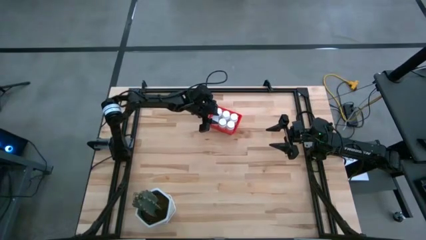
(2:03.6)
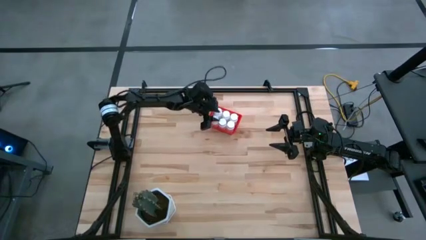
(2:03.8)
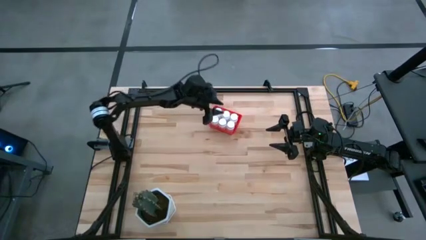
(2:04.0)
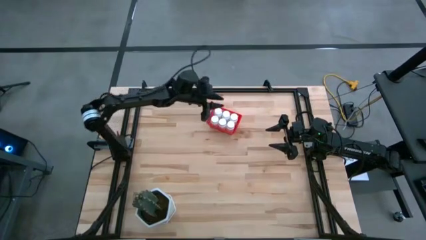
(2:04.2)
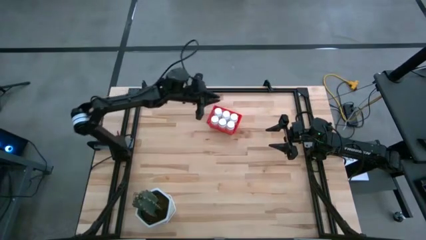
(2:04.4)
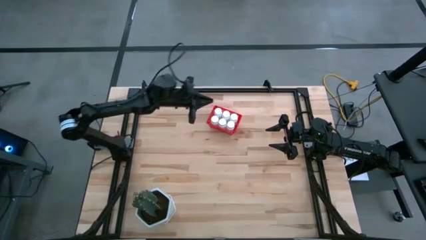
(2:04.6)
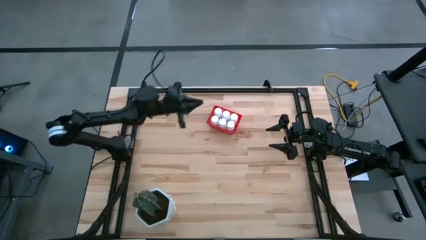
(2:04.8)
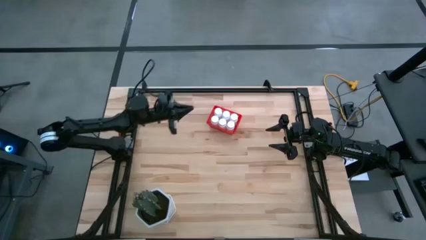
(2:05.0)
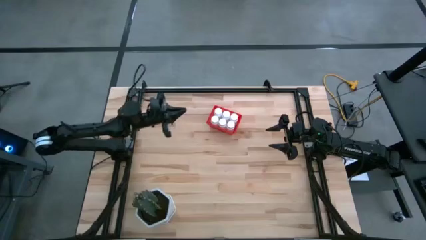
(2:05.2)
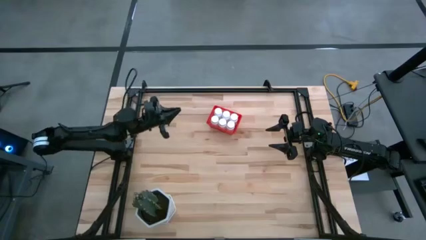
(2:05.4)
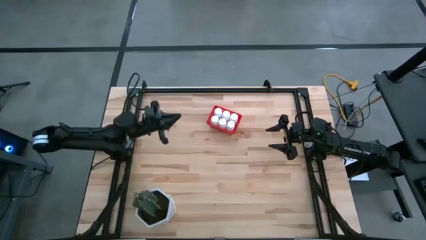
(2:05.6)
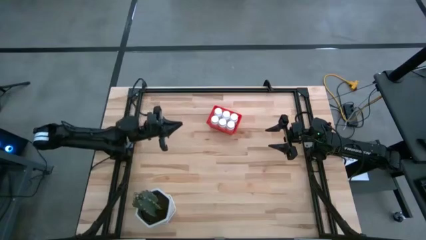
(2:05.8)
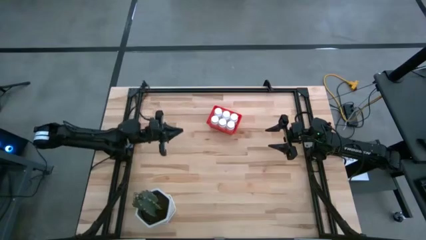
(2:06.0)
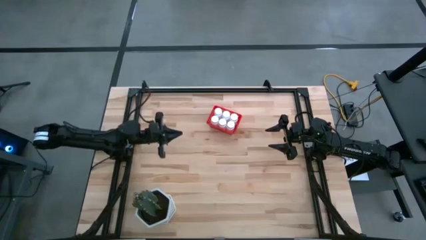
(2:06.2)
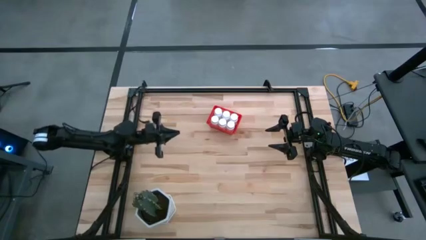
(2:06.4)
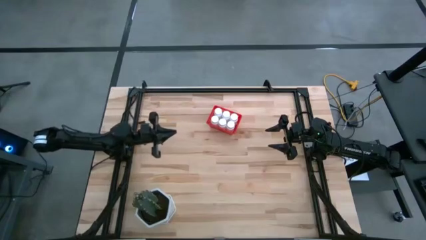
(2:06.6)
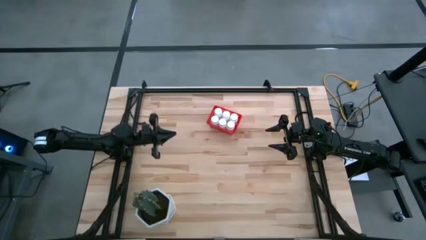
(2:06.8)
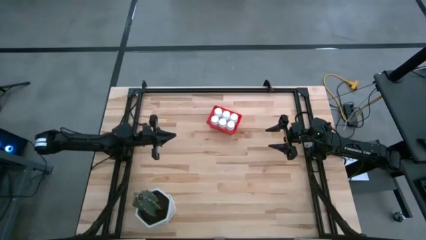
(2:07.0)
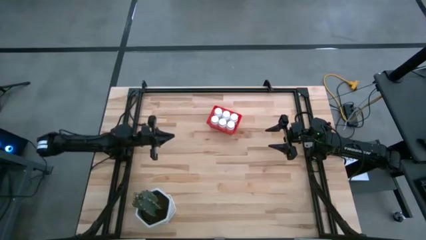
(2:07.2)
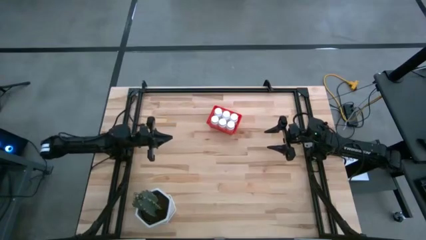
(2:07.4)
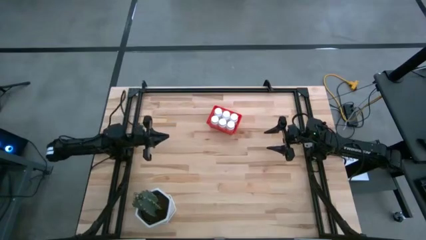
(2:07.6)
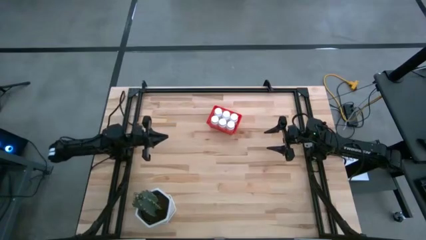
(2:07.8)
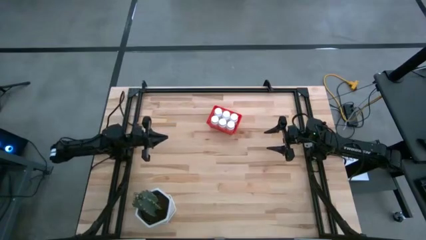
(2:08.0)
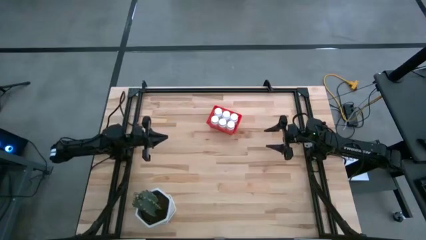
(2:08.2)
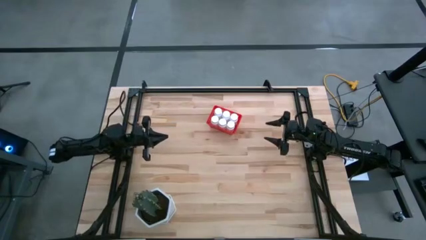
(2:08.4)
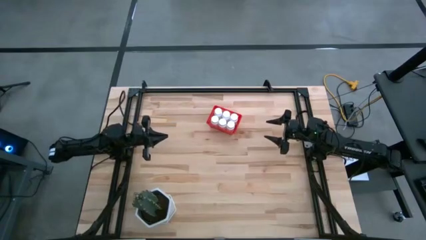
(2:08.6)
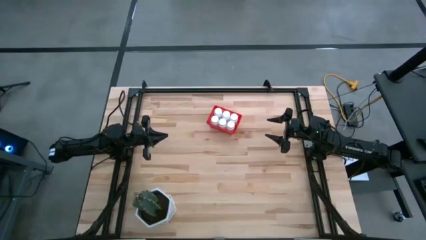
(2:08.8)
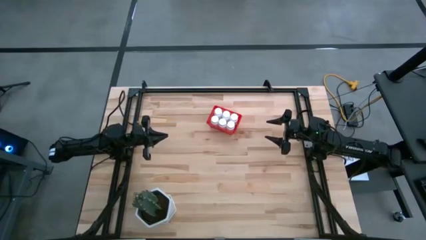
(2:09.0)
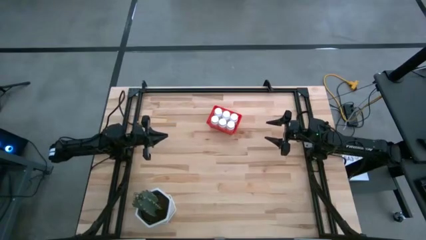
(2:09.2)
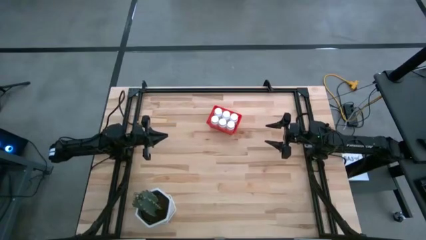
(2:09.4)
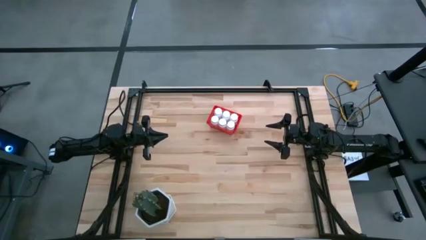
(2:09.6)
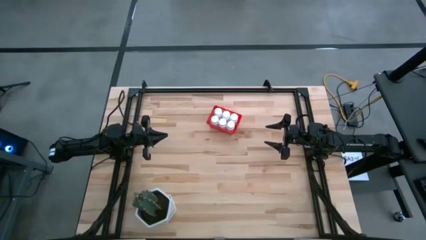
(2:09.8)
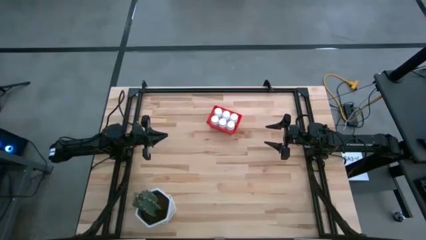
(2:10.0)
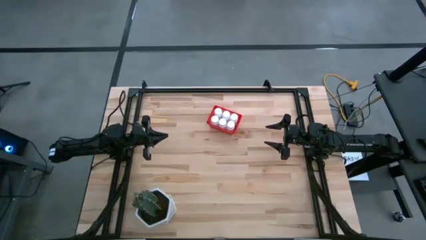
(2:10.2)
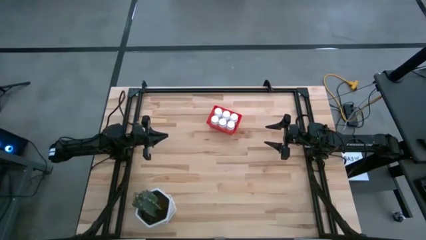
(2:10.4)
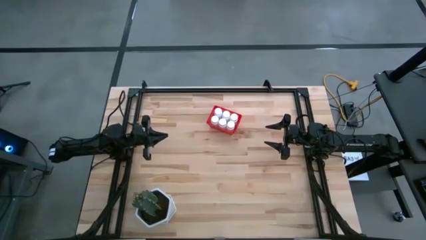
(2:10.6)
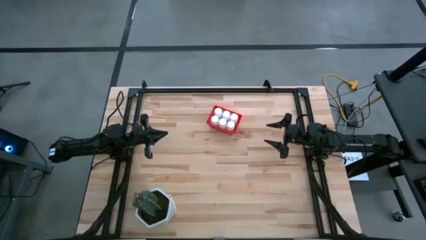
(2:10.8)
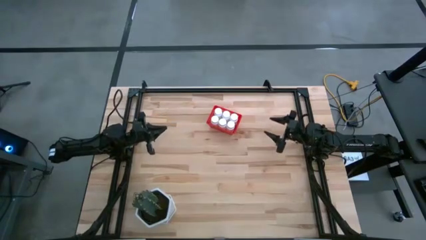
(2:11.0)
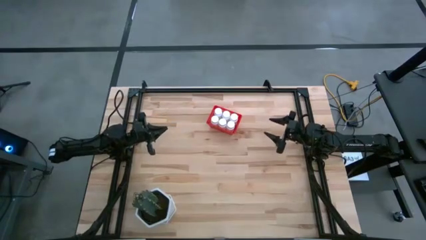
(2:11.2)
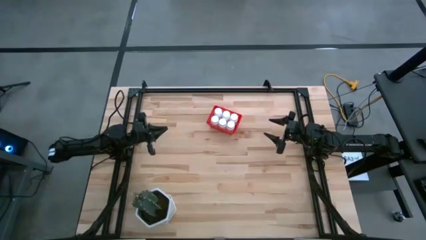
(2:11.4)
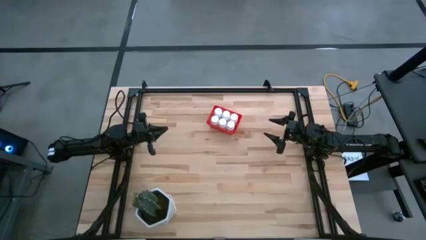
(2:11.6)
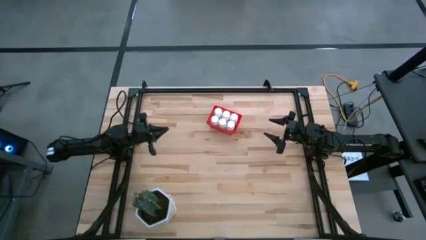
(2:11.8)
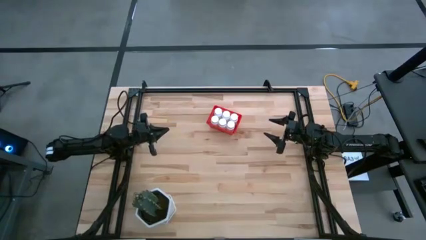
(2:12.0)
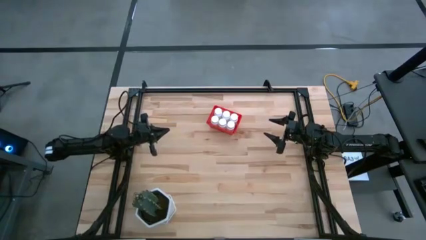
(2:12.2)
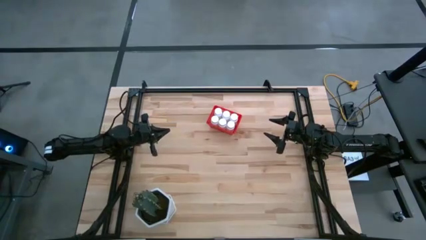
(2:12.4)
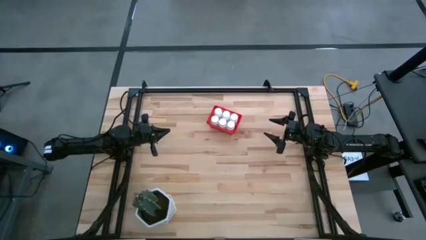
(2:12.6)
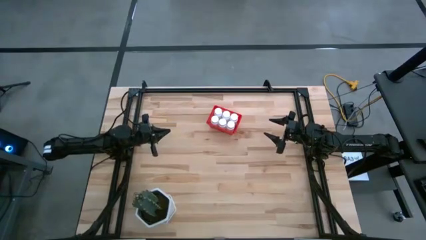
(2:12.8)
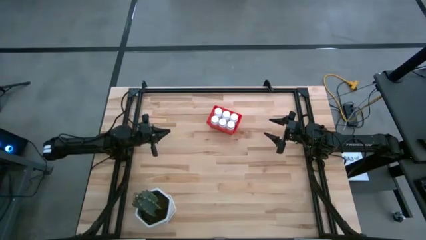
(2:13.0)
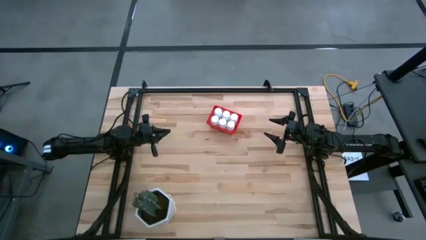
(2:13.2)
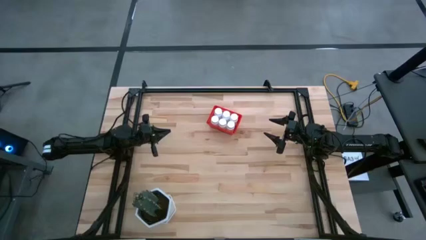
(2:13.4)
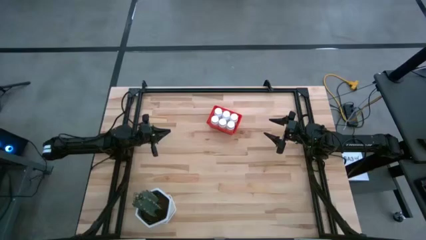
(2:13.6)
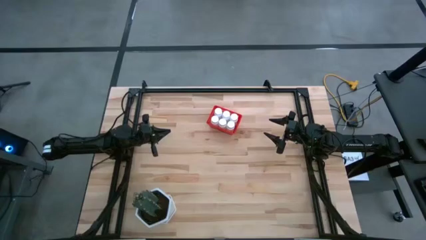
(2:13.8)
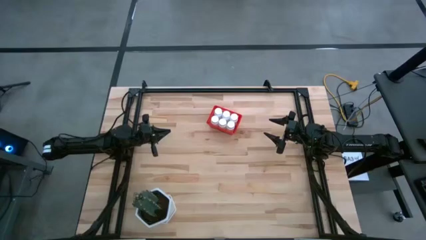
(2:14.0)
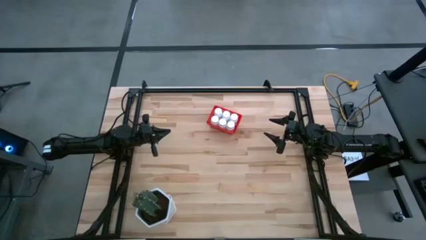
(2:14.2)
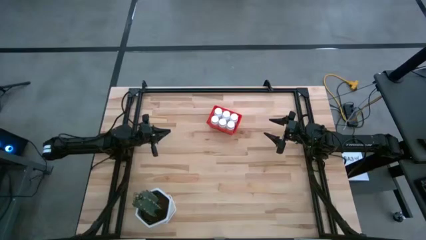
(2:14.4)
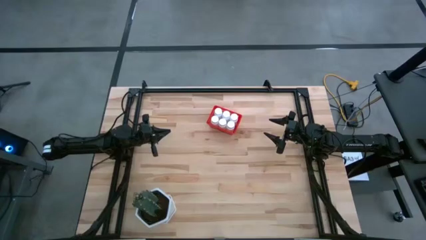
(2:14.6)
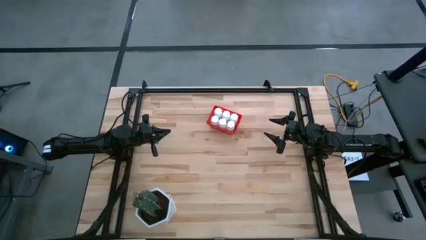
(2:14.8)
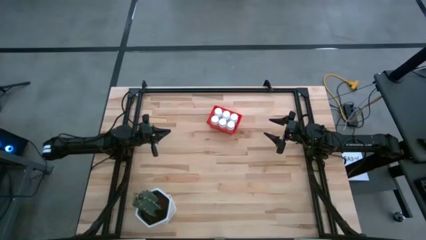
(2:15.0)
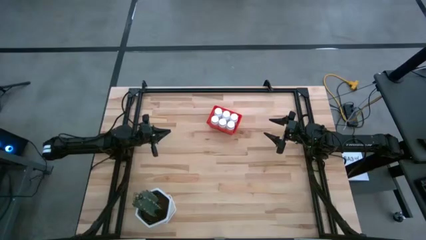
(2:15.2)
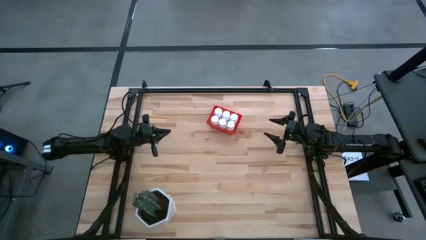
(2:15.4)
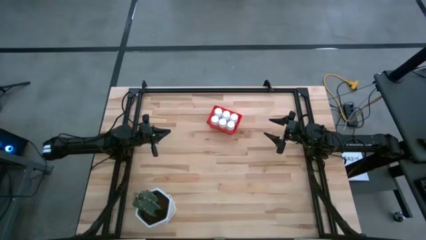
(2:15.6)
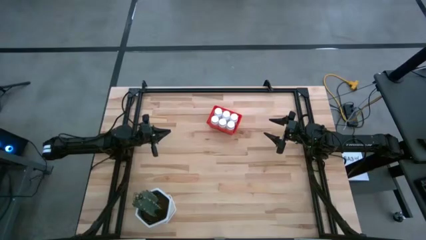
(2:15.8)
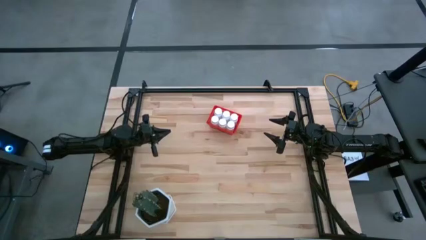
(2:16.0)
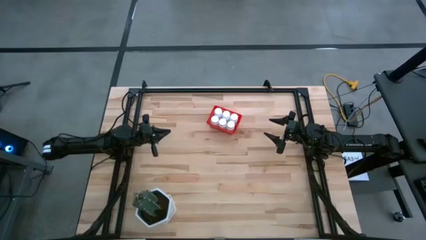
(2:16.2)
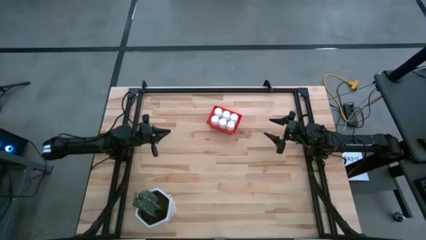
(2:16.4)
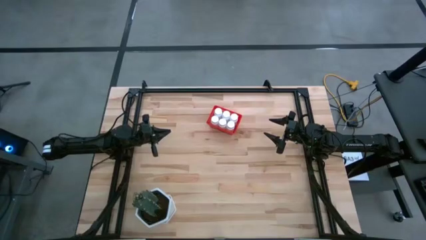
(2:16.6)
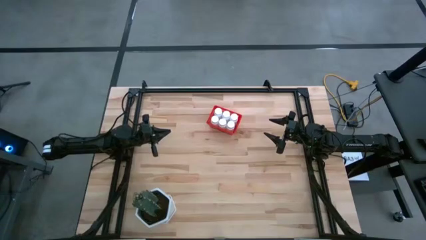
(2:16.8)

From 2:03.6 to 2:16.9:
Task: Pick and place pill bottles into a basket
Return to Home Position

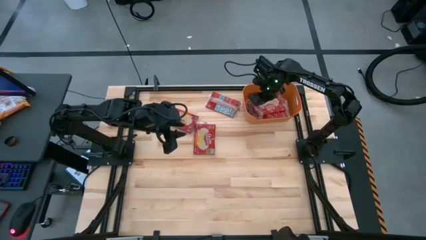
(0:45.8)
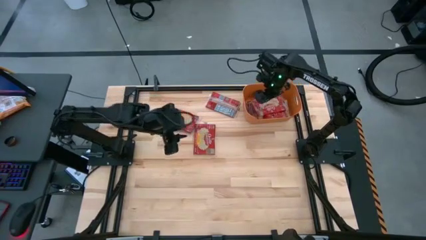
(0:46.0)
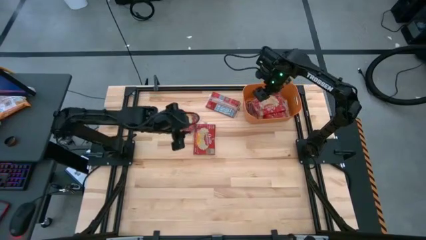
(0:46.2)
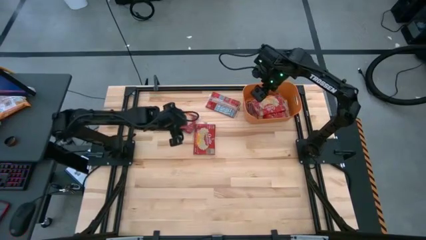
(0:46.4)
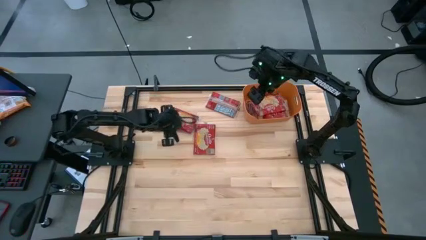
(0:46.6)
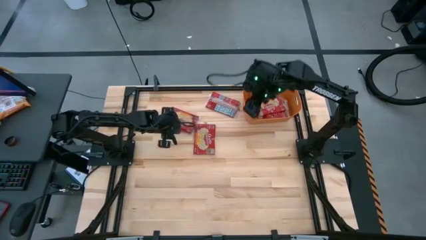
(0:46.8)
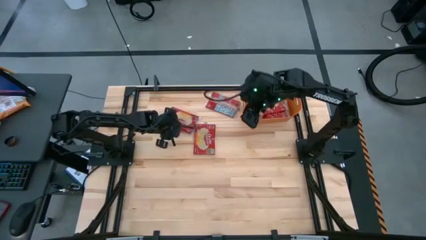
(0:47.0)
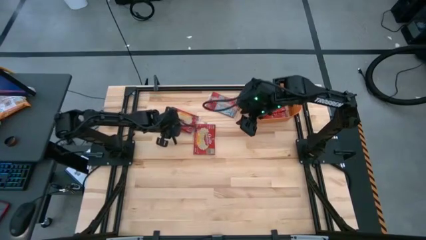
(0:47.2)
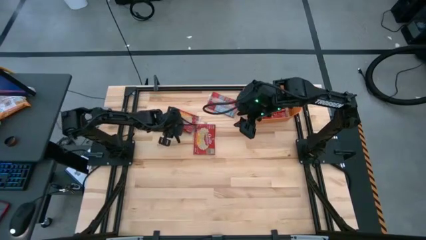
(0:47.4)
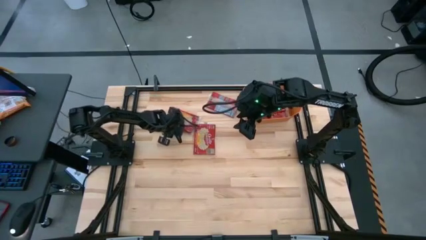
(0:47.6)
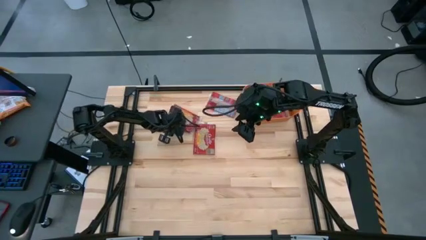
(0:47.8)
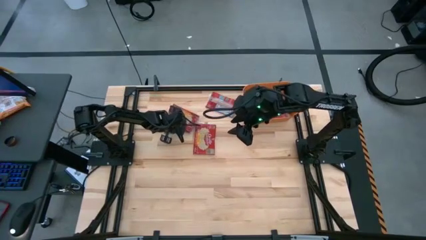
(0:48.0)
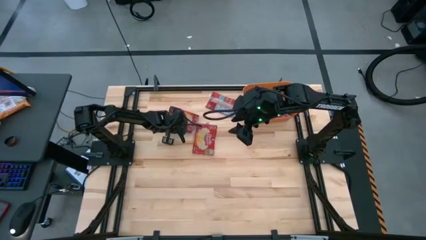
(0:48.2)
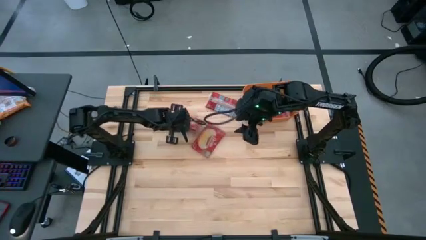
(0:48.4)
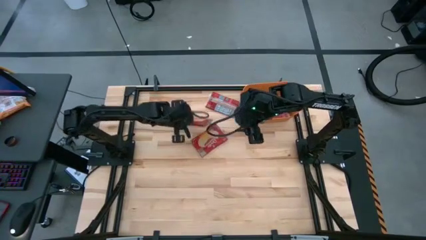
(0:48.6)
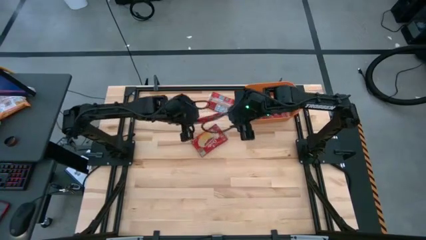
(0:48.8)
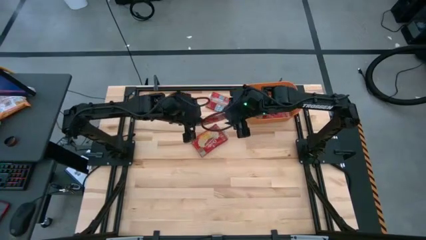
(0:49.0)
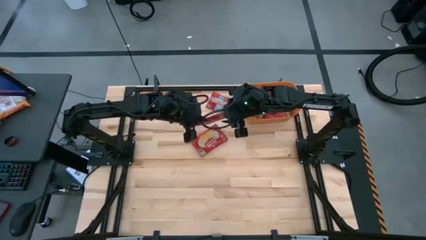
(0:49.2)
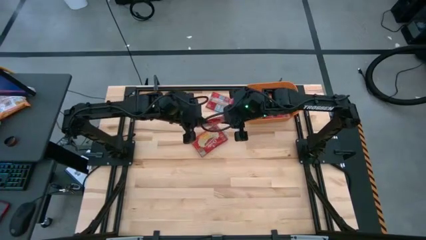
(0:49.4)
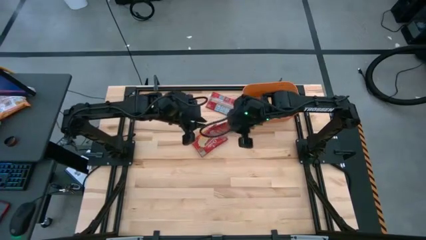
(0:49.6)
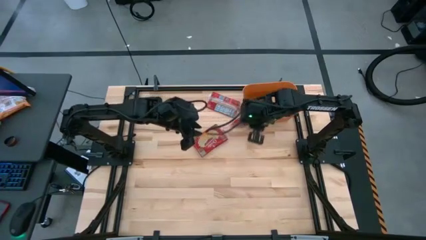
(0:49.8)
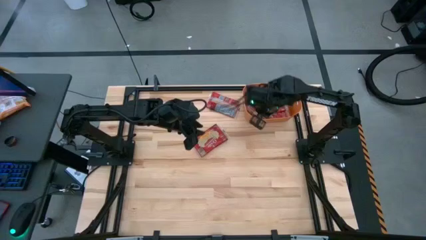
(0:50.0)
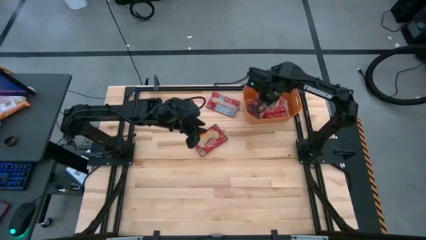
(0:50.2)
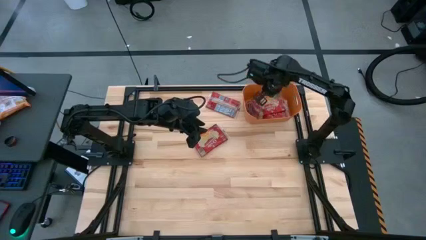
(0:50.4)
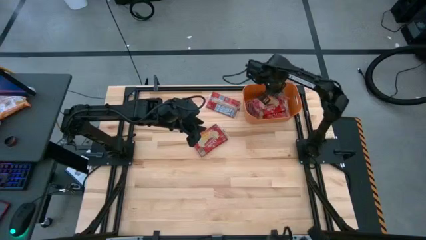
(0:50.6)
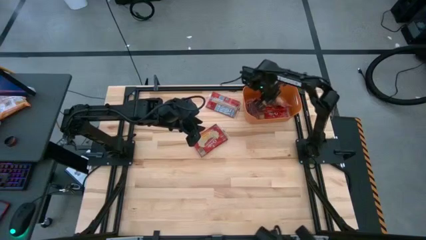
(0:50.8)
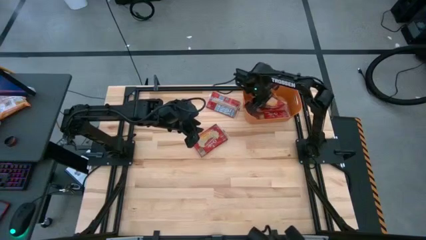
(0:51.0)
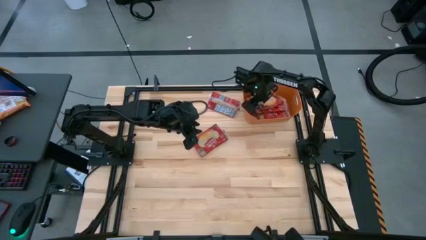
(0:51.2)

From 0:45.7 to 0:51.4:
Task: Sort popcorn bags into baskets
Put the red popcorn bag into the orange bin
